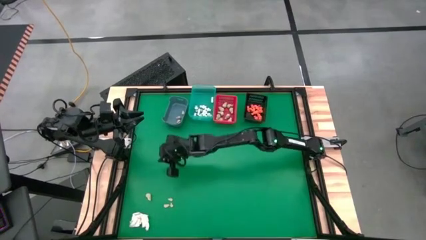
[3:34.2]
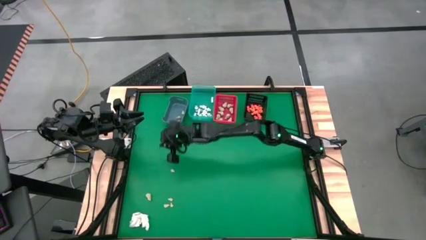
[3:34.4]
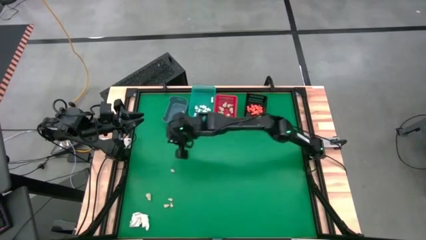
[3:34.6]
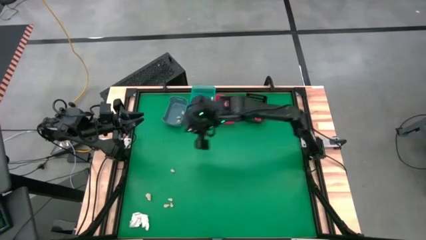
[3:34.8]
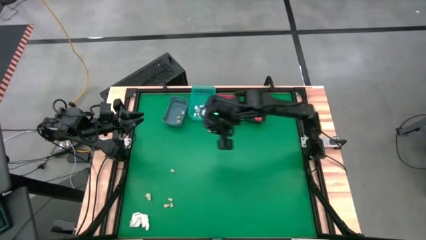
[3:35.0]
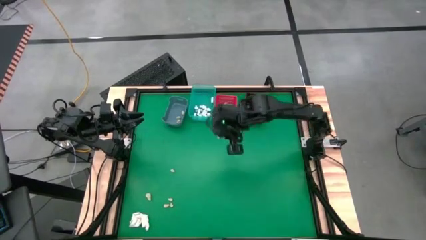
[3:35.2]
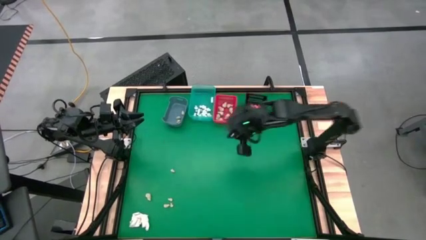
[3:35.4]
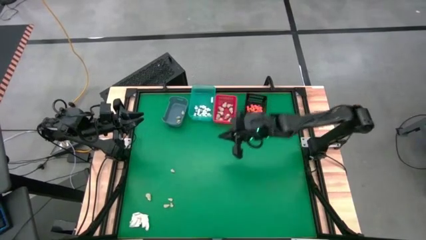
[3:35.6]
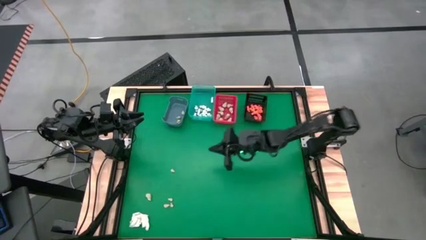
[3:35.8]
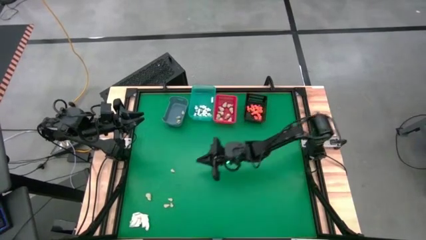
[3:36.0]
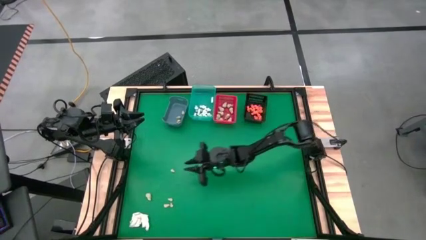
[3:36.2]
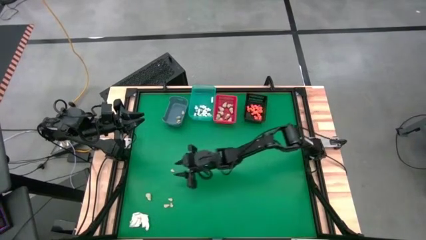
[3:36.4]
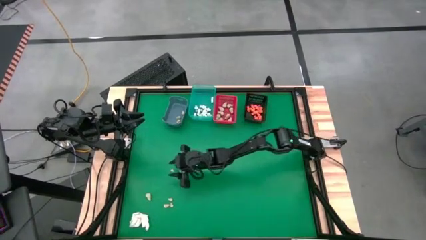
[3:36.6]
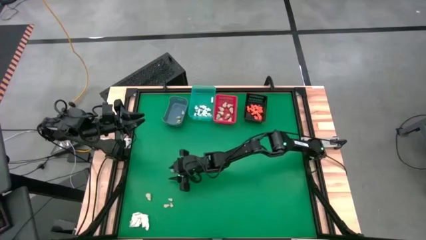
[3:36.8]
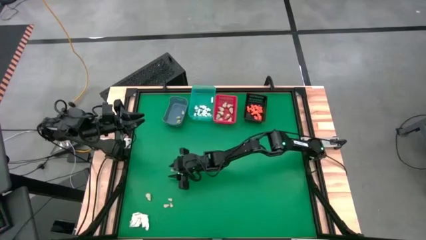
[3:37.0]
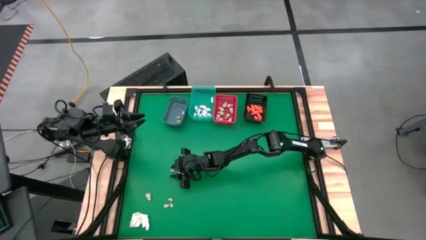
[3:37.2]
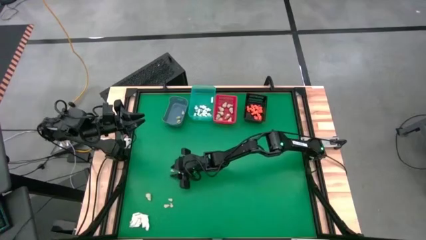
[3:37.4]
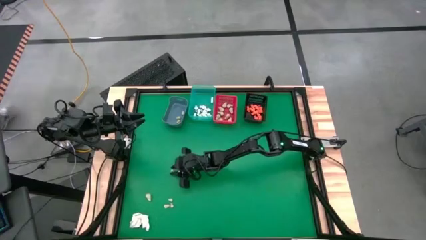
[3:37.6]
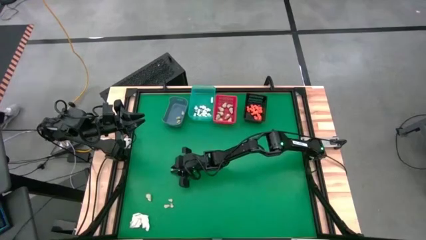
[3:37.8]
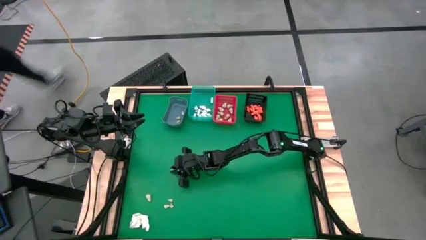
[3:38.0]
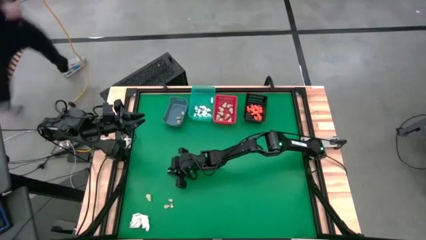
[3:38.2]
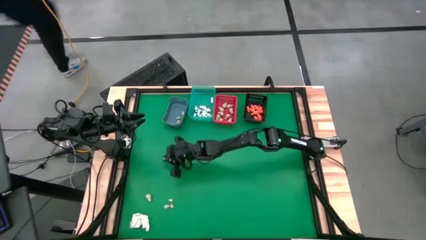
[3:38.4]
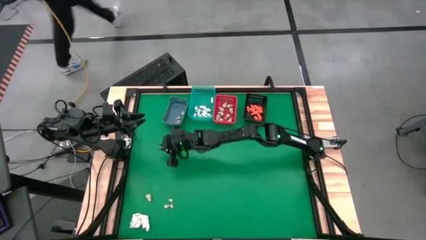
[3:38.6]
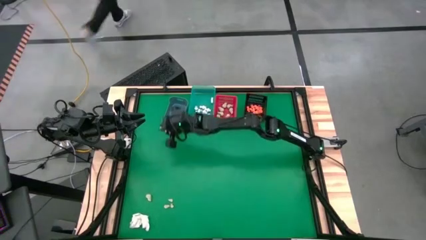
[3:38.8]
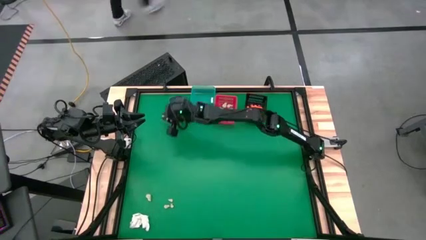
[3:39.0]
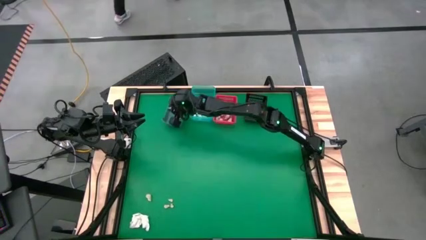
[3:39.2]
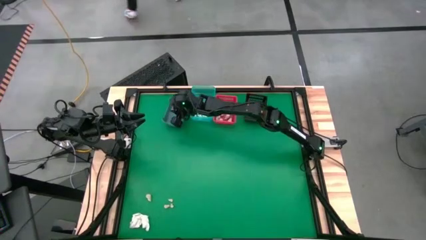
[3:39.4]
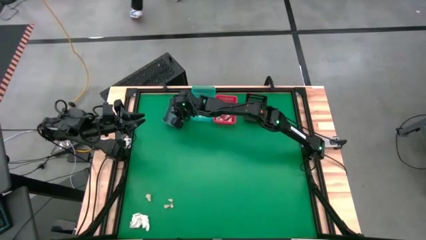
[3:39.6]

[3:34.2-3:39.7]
Task: Sort Halloween decoration
Put the white skull toy into the blue bin

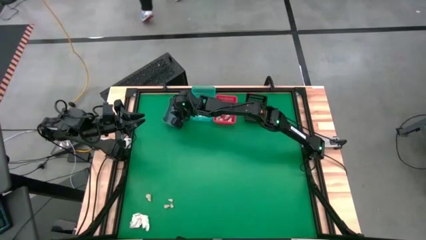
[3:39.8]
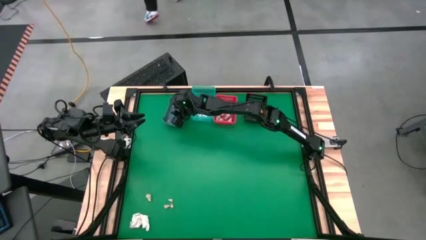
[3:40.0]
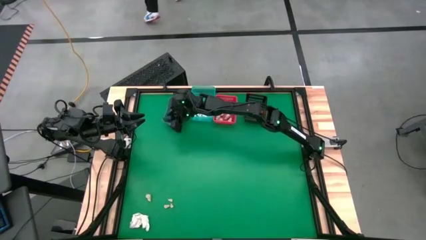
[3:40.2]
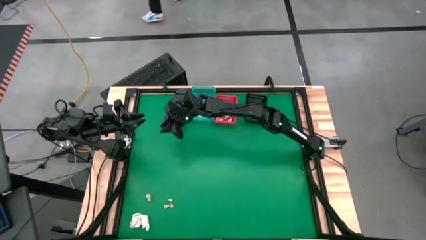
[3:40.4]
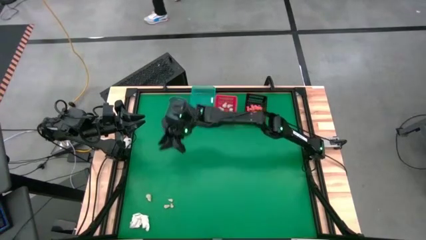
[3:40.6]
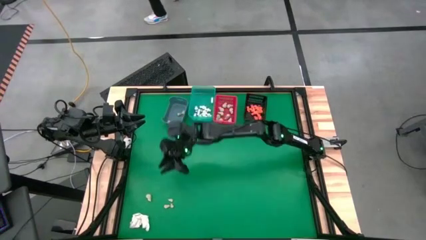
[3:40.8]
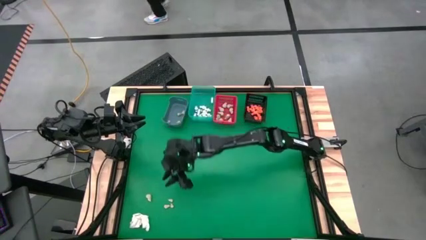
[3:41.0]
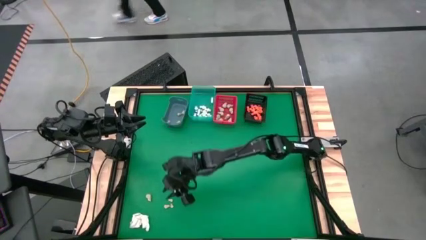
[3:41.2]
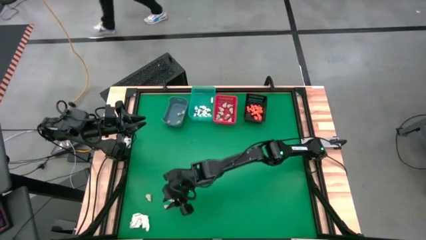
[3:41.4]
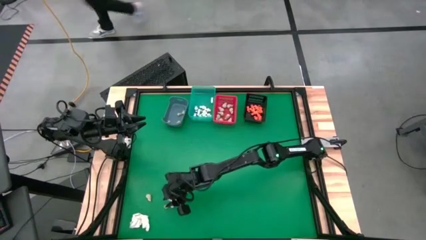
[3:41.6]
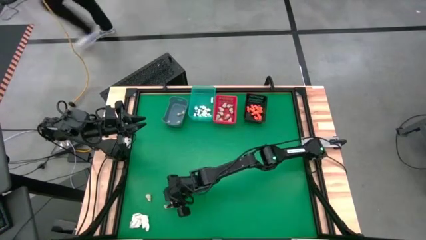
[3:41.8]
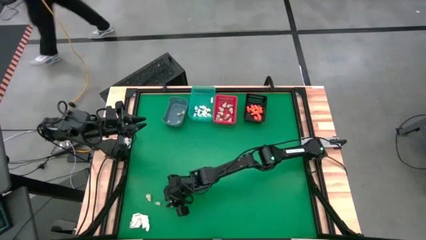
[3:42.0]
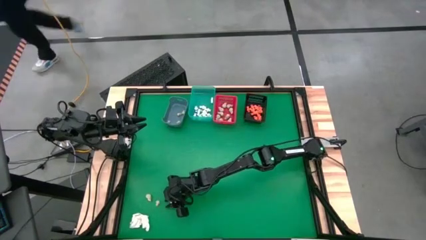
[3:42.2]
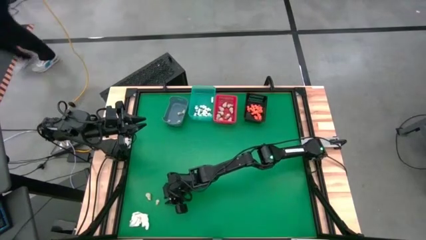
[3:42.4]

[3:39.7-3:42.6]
Put the white skull toy into the blue bin

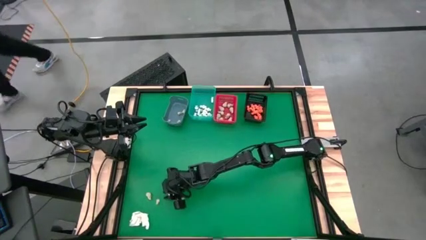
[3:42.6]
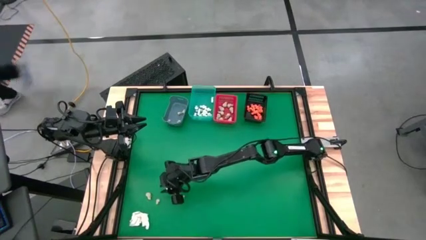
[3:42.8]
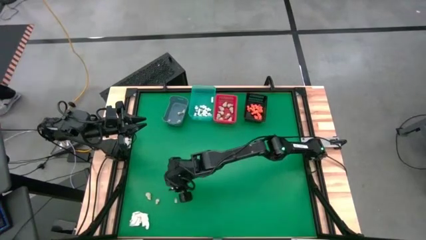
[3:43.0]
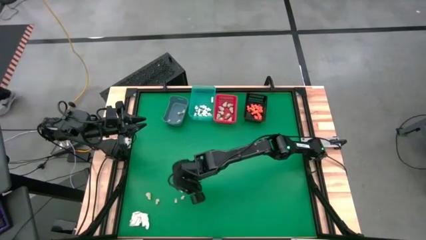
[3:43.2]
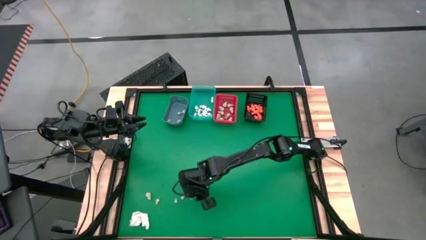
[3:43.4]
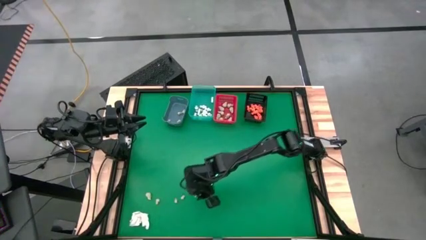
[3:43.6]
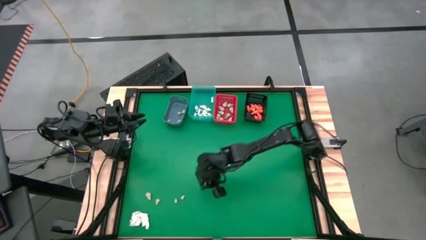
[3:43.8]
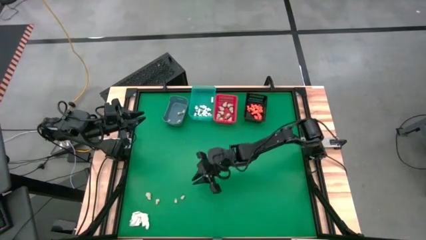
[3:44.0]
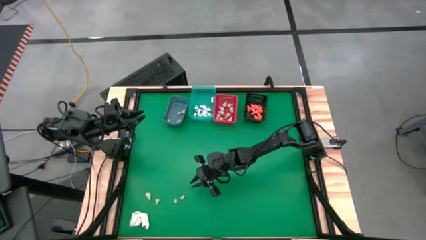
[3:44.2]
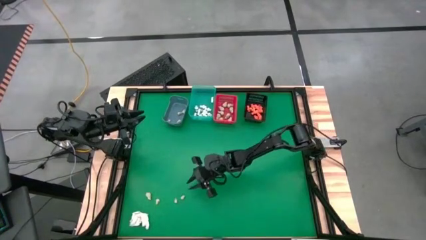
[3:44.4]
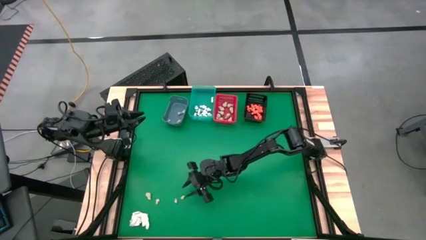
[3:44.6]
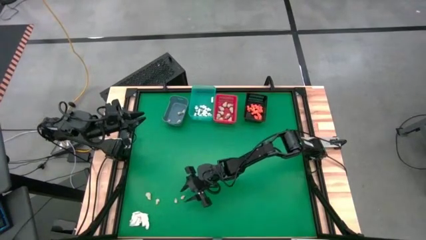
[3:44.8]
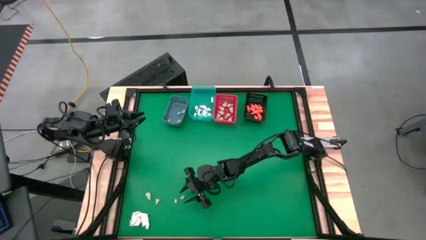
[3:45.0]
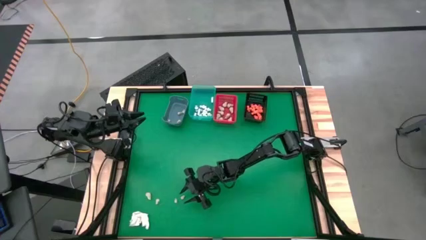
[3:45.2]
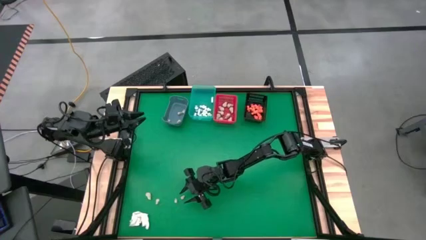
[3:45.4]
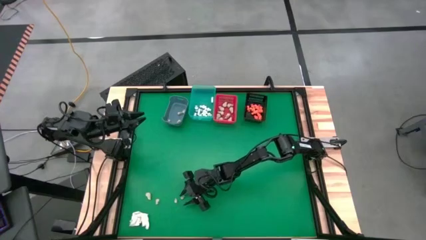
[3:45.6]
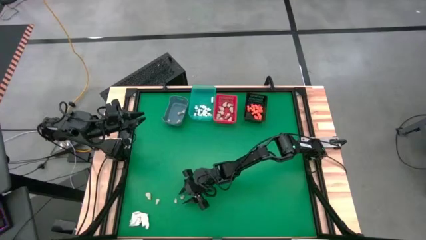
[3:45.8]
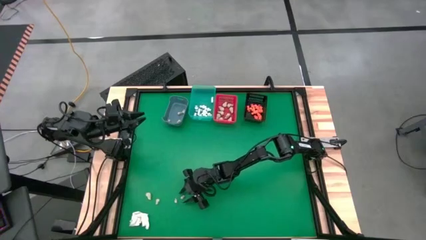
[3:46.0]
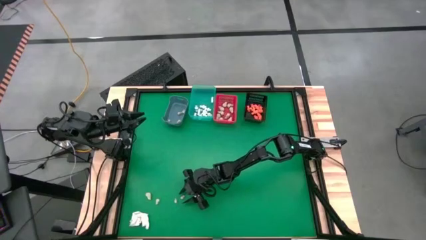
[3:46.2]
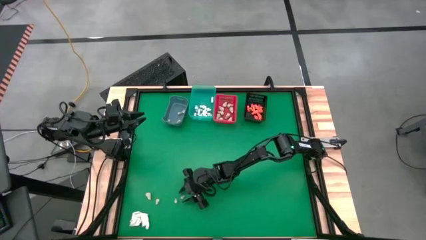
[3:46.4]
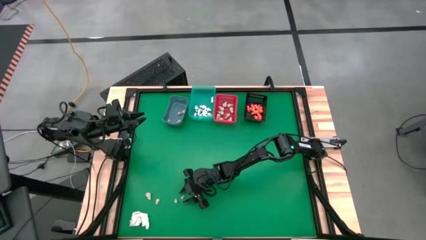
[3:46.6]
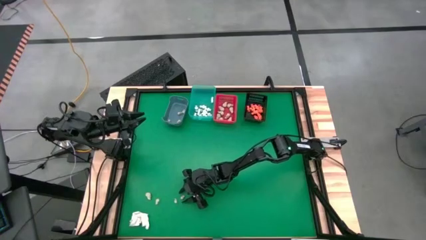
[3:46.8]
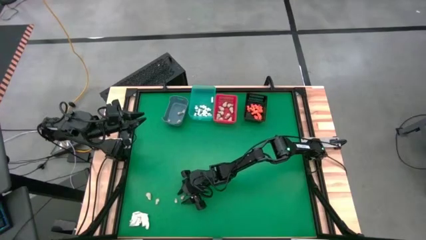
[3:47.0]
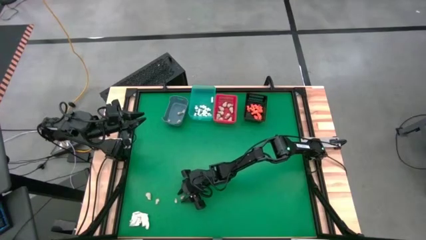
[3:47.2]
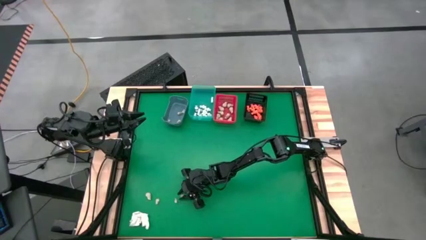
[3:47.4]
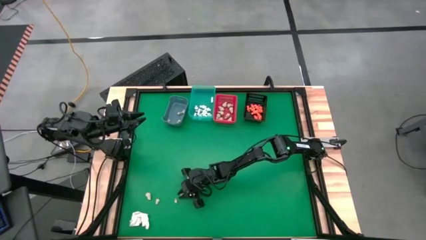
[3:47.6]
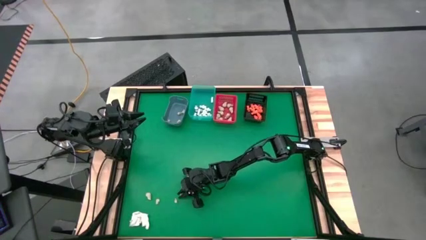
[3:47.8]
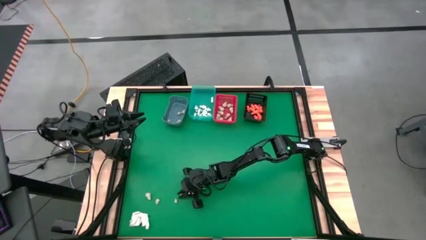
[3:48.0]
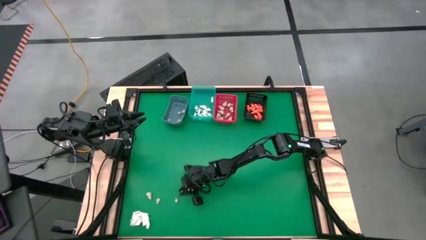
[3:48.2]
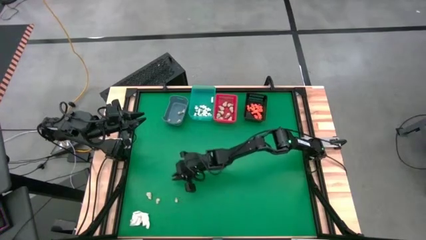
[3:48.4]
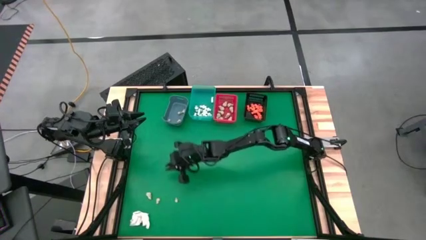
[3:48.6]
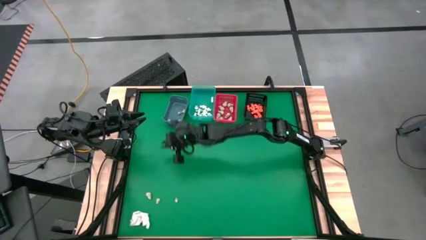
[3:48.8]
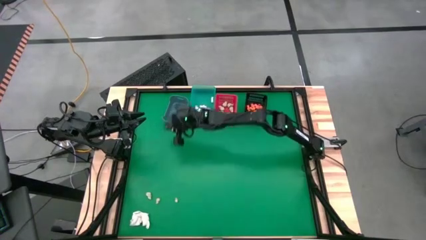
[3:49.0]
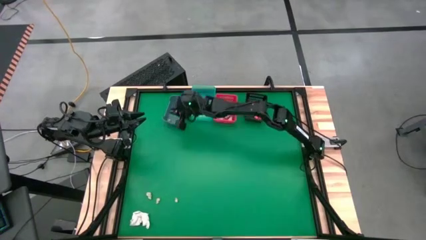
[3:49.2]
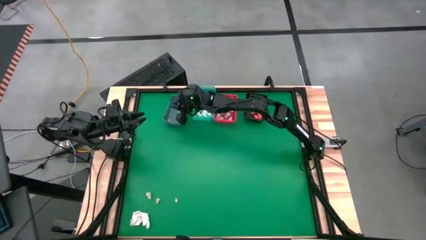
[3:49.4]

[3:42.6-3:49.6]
Put the white skull toy into the blue bin
